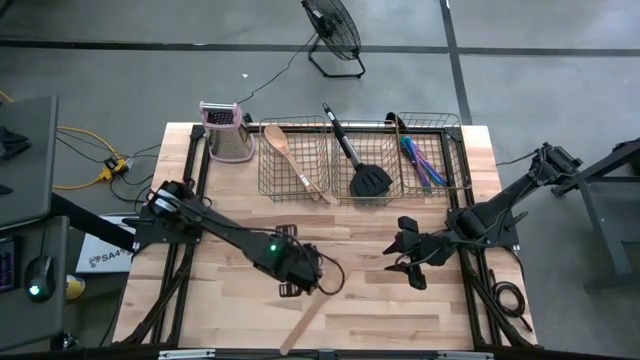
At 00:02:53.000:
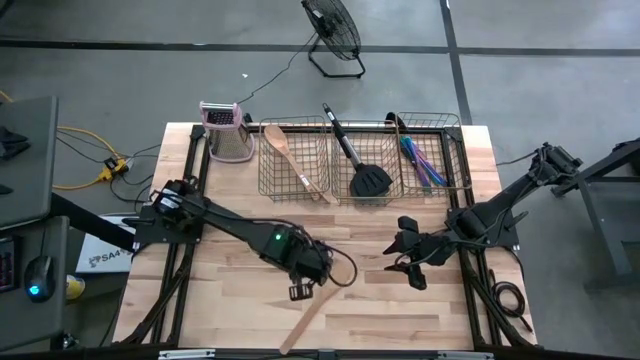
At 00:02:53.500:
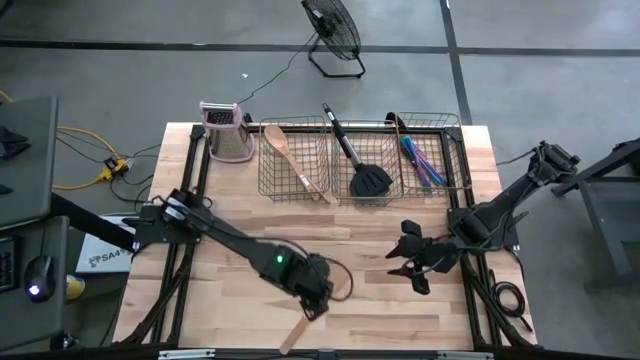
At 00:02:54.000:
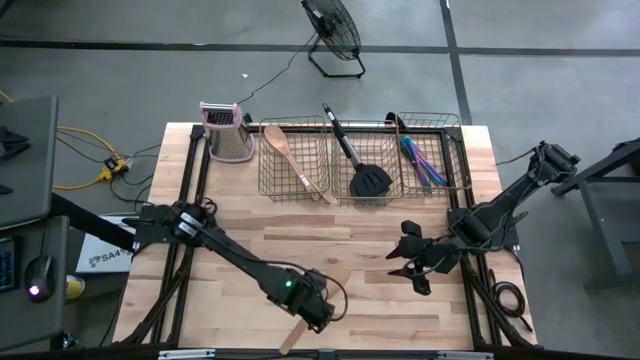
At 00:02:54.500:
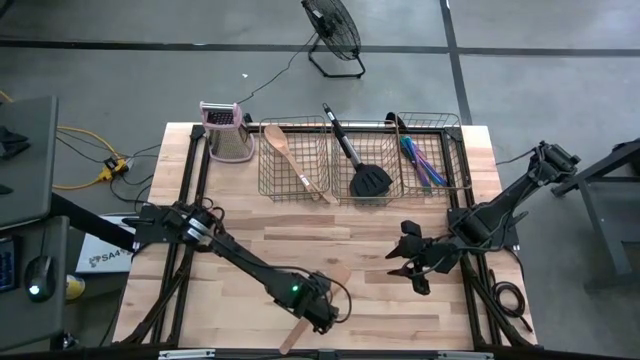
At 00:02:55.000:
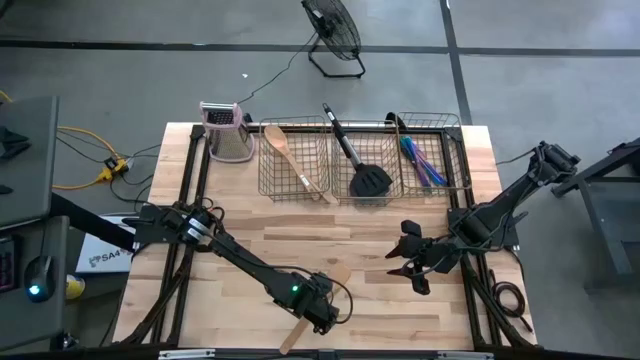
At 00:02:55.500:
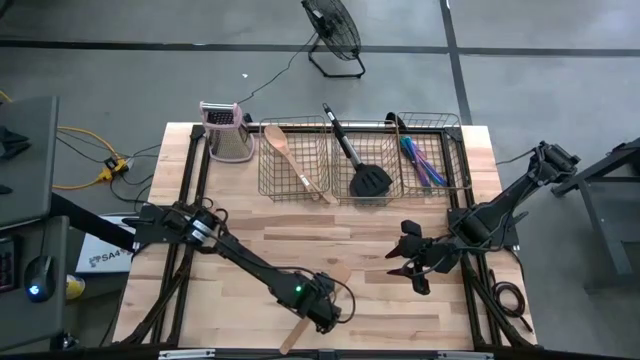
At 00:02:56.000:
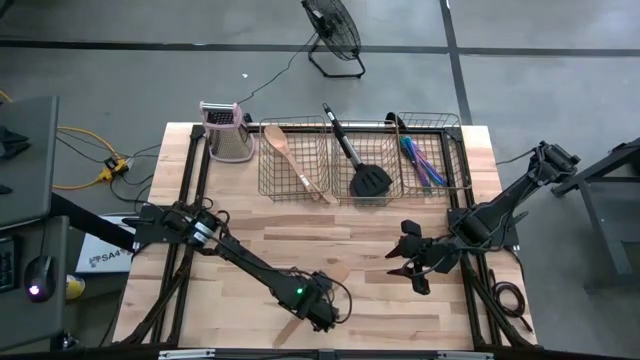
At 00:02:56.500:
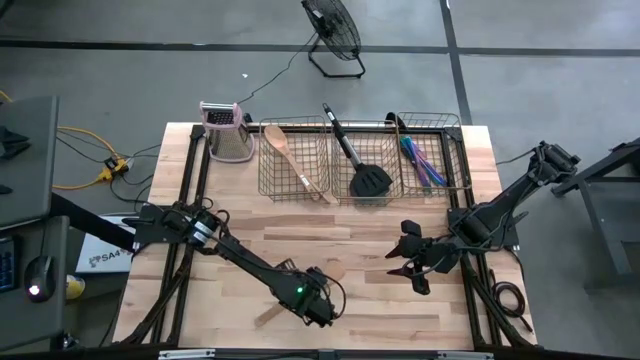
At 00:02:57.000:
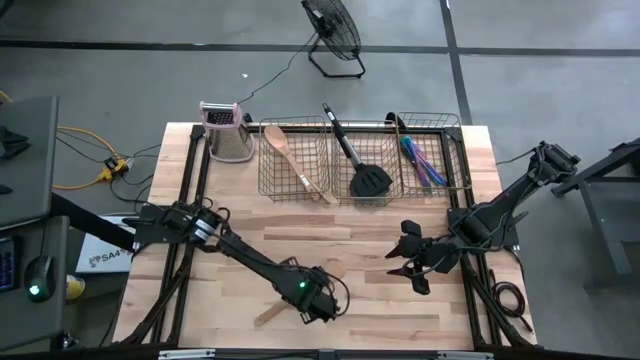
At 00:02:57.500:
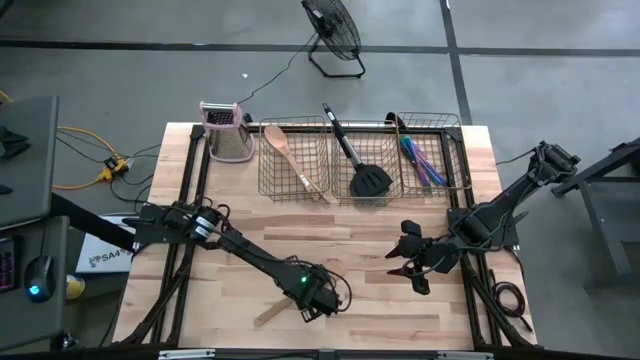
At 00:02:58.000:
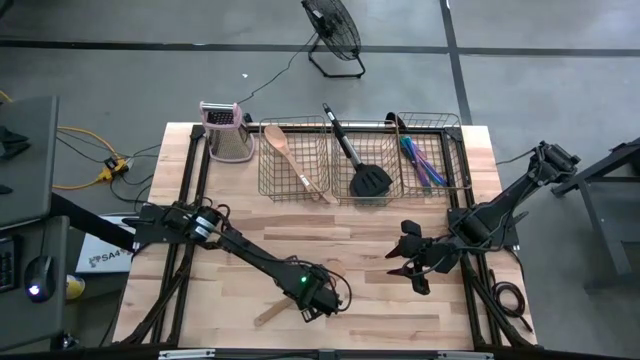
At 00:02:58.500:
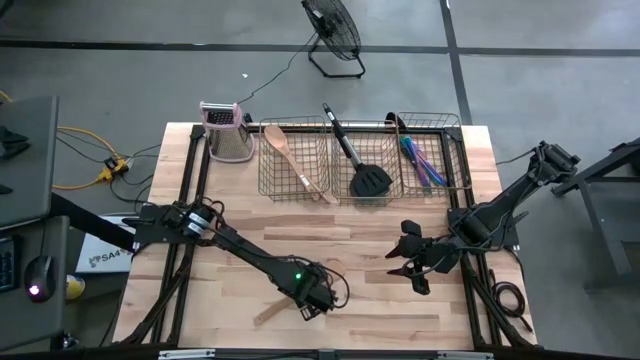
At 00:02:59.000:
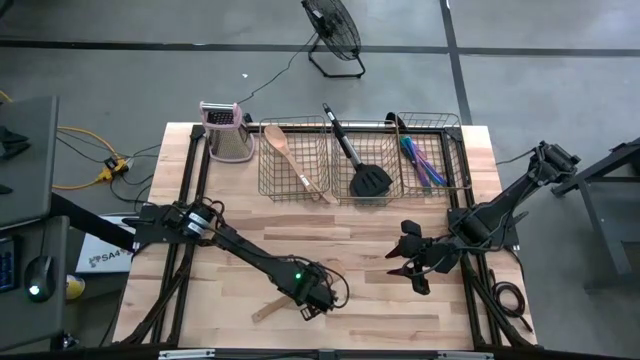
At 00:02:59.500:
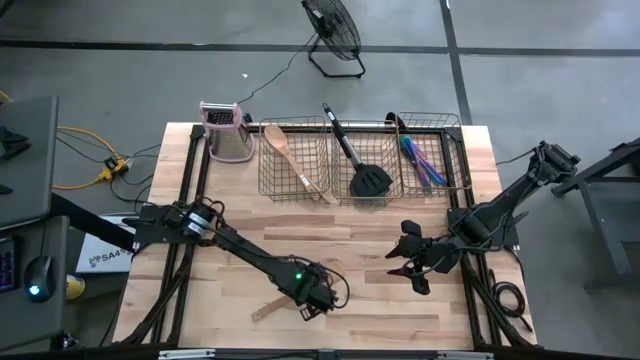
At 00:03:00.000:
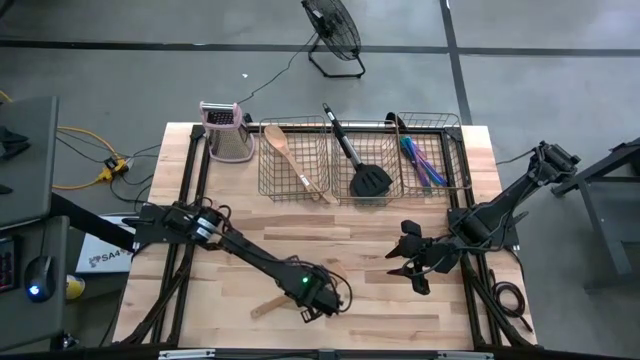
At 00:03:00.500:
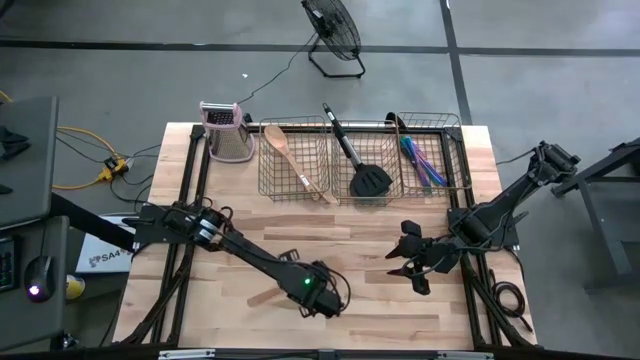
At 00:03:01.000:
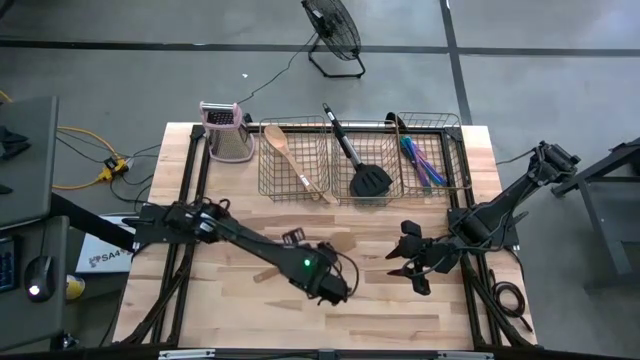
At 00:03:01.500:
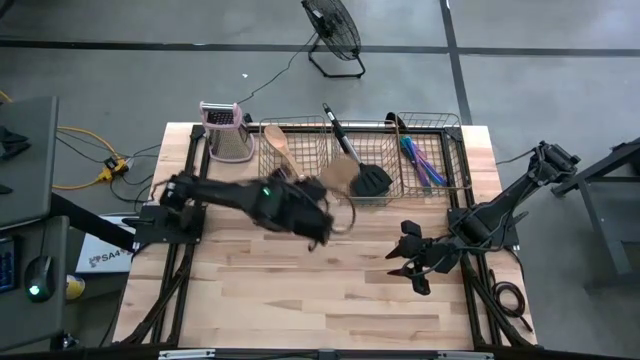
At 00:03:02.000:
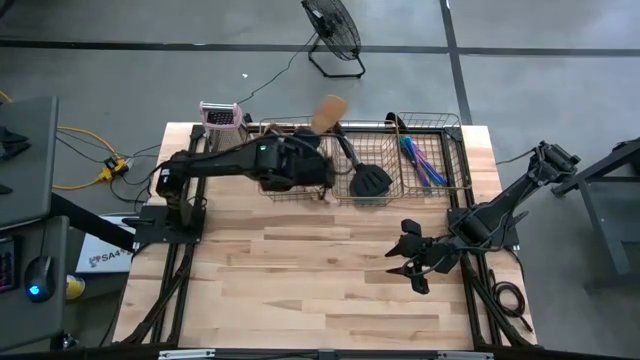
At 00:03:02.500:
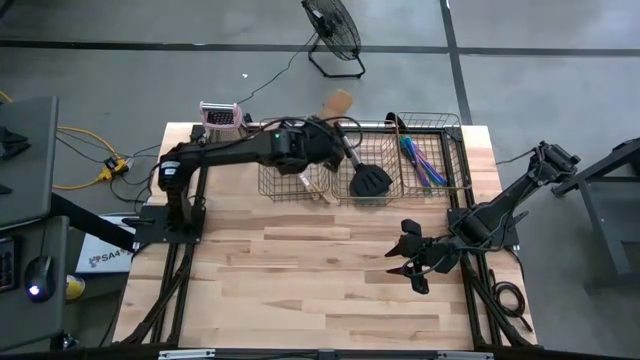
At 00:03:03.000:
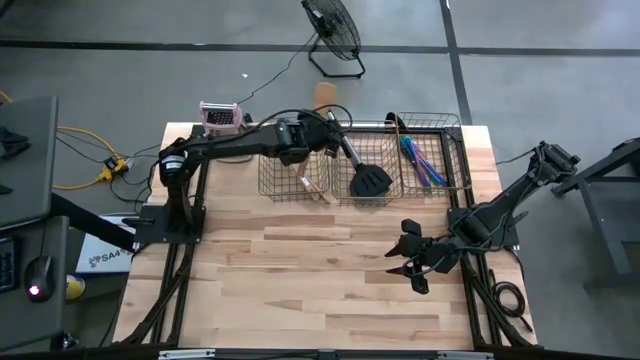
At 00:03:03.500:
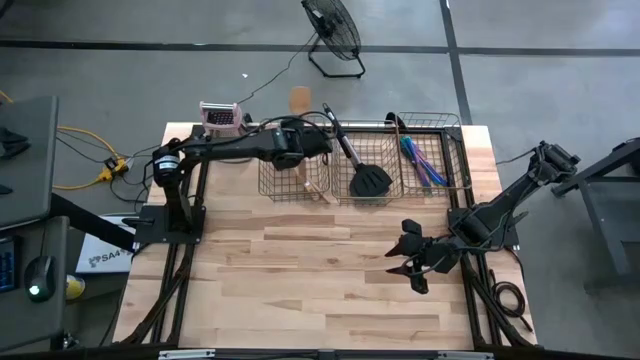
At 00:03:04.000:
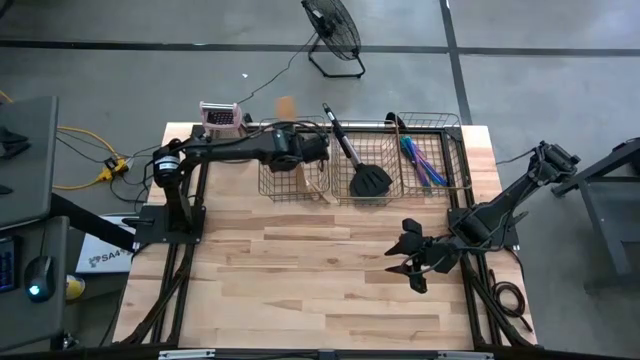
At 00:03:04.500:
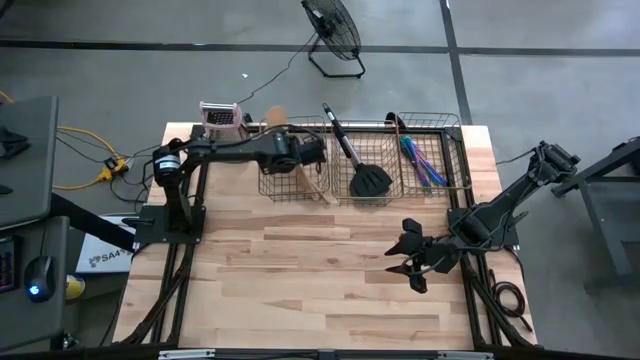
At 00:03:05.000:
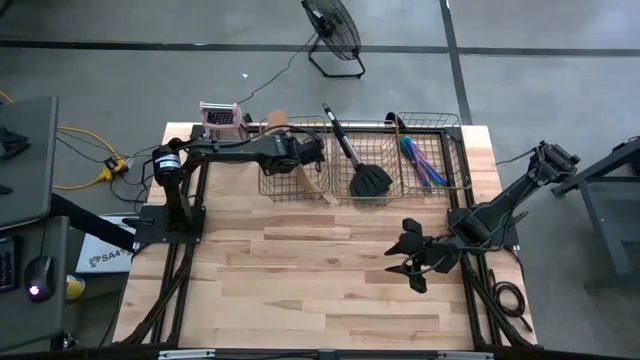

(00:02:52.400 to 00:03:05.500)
Task: Pick & Place Kitchen Items
Put the wooden turner spatula into the left mesh basket

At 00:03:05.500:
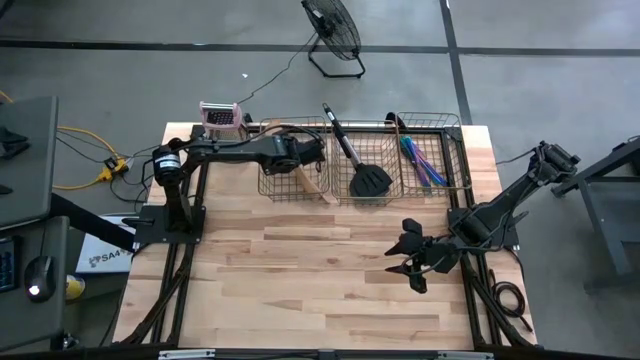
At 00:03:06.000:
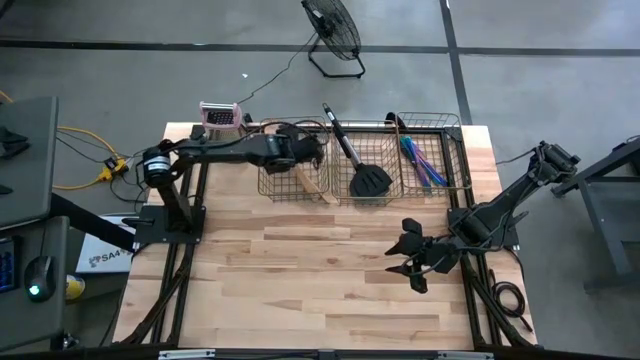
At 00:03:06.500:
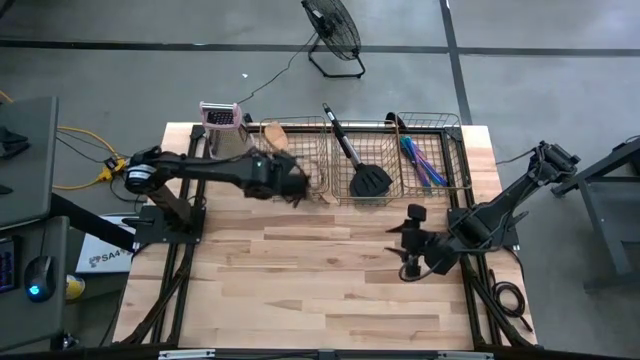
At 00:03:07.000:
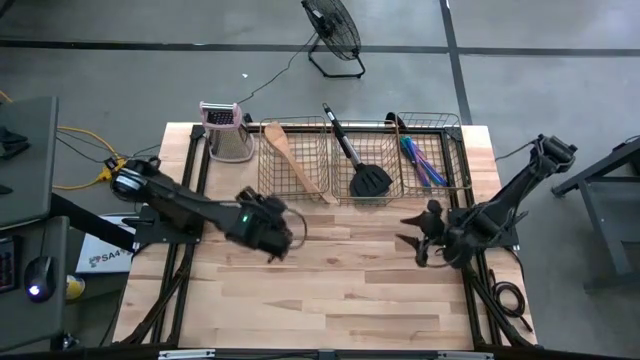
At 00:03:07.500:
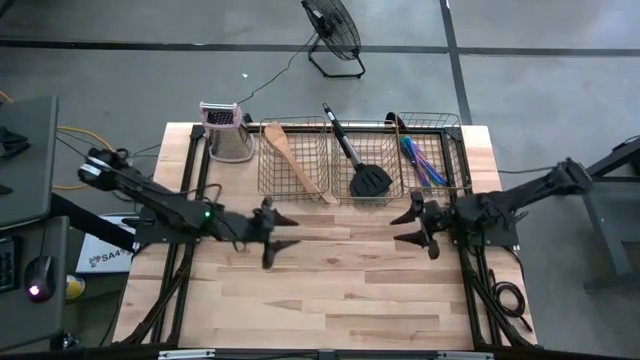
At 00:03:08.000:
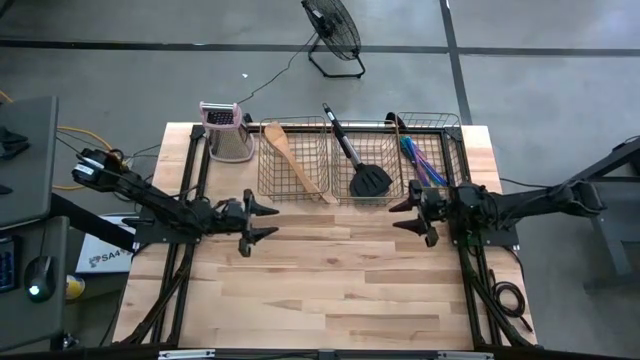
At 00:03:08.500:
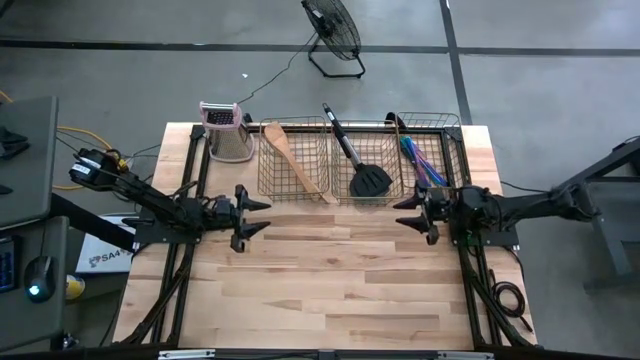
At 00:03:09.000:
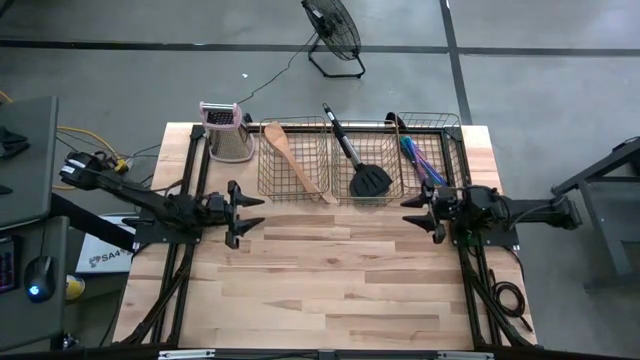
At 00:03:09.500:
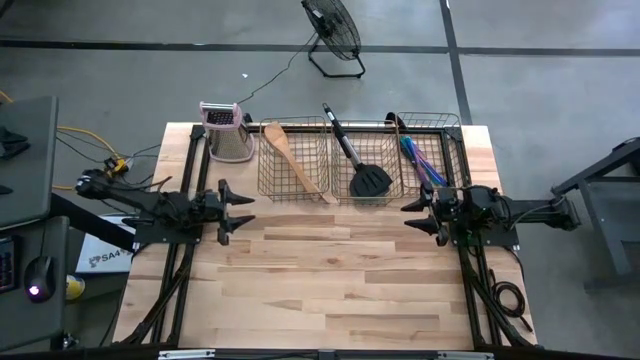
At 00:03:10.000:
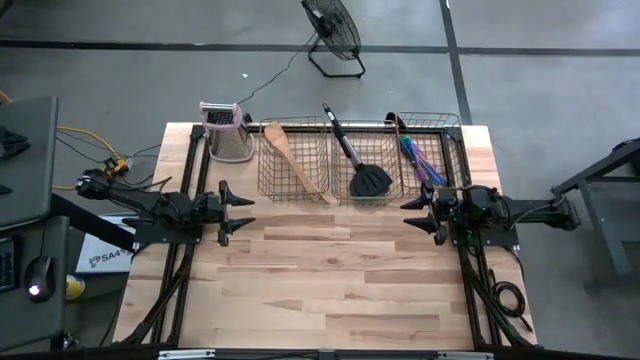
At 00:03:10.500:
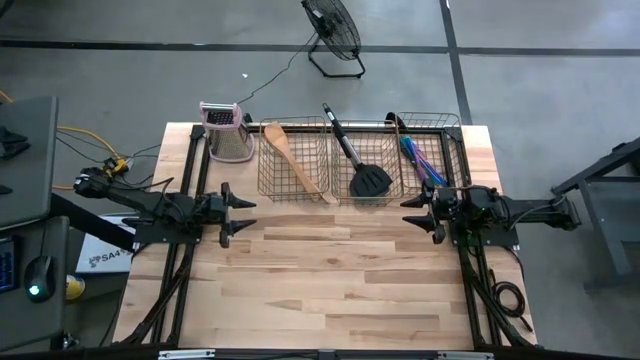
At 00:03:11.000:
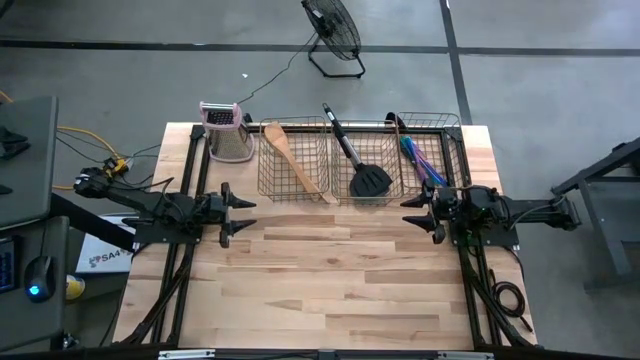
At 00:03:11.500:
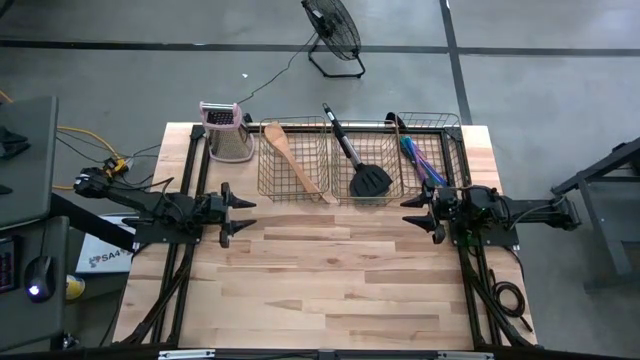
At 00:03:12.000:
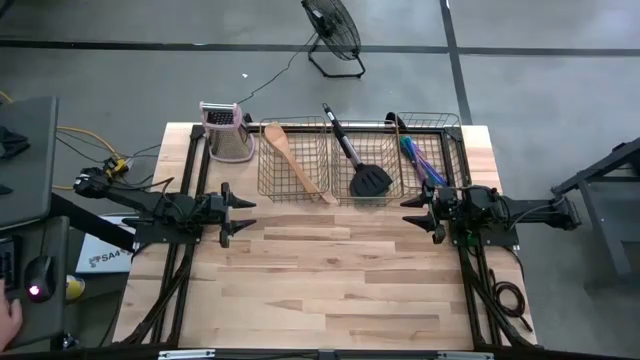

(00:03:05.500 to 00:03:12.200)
Return to Home Position
